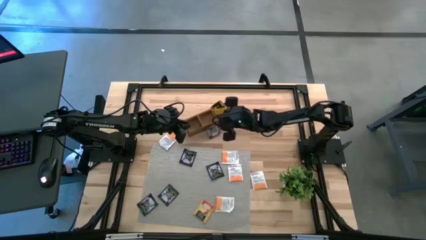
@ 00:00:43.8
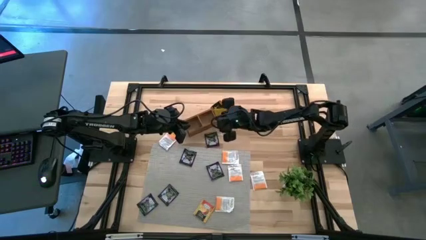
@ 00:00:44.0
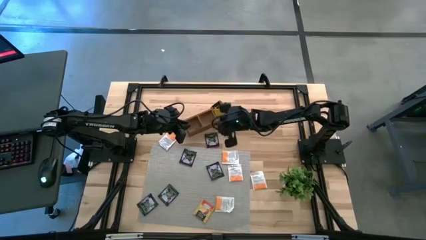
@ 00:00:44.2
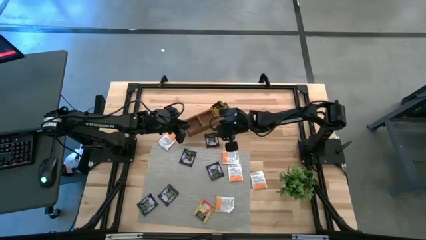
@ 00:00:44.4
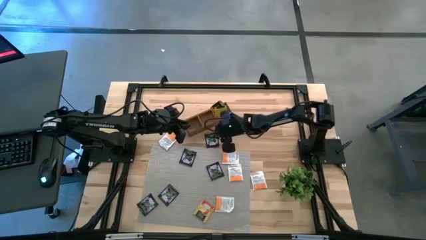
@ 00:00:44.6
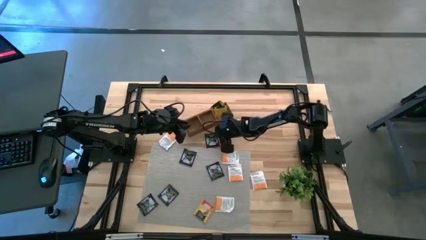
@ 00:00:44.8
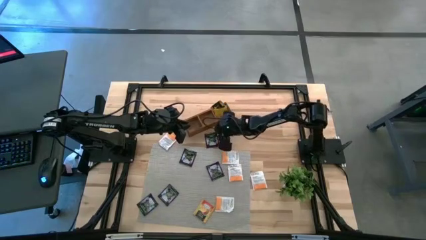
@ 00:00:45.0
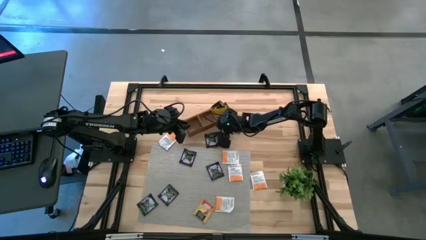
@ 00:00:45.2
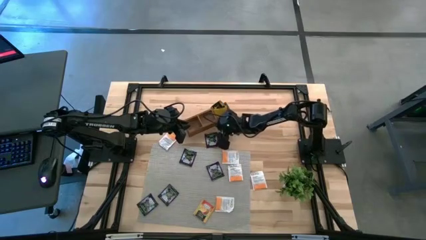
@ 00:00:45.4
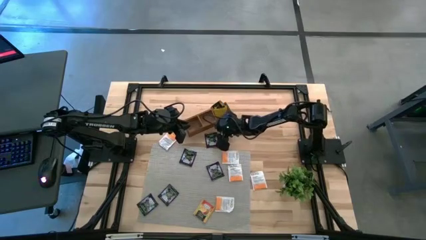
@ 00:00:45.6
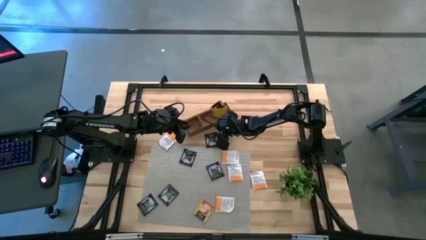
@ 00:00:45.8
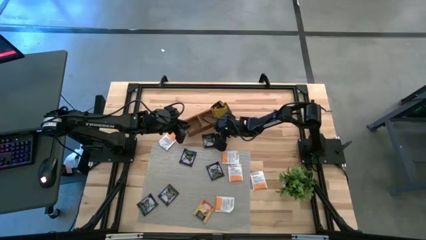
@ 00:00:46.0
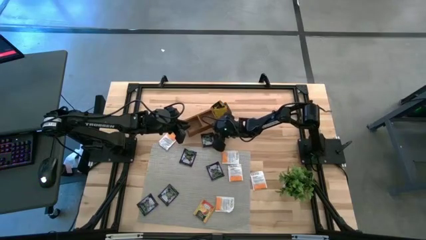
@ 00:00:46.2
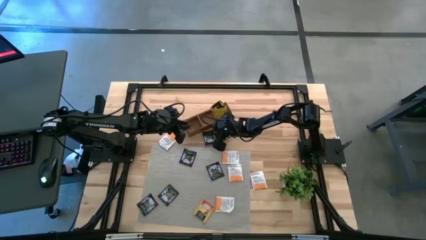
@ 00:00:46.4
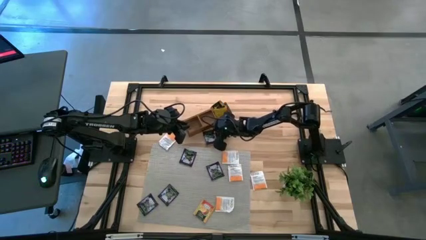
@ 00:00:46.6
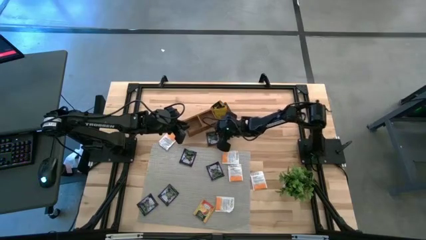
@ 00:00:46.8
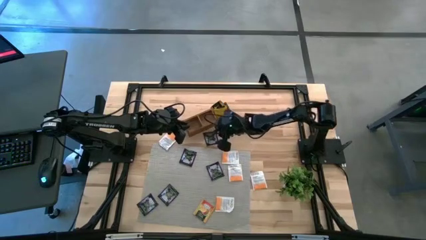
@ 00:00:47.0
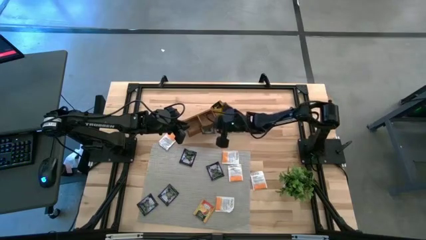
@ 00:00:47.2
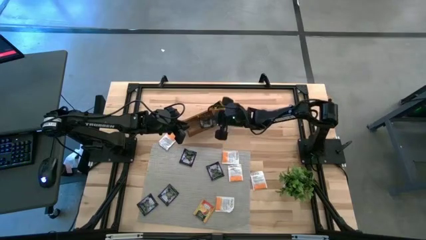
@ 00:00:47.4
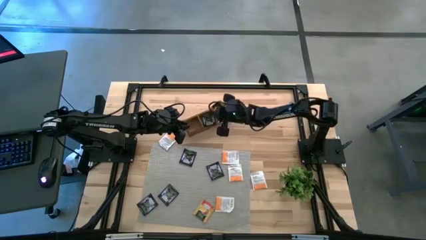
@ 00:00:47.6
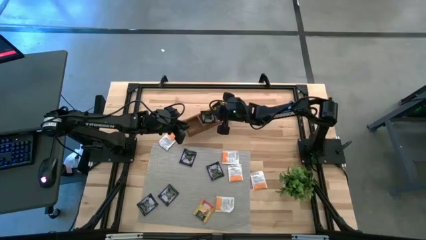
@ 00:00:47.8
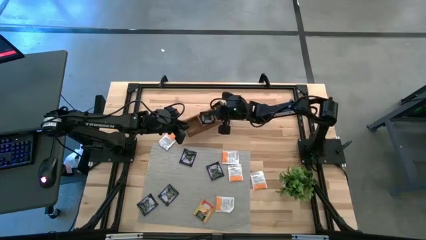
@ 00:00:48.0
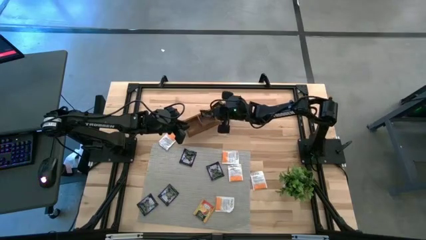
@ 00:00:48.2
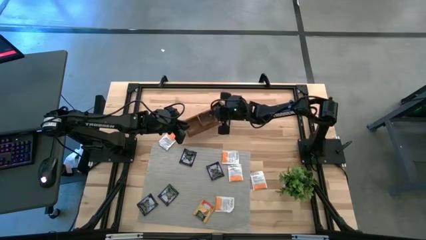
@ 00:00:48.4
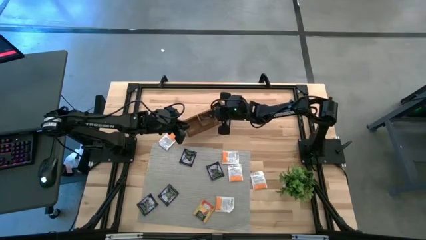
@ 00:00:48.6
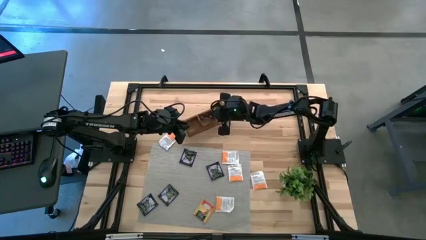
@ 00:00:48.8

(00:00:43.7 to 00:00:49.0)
Task: Pick & Place Tea
Put the violet tea bag into the middle section of the wooden organizer

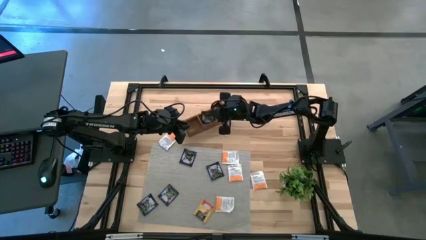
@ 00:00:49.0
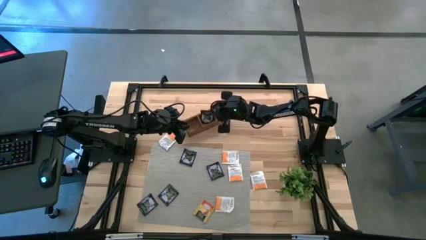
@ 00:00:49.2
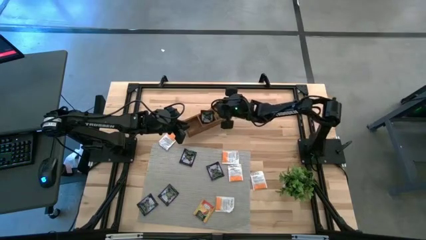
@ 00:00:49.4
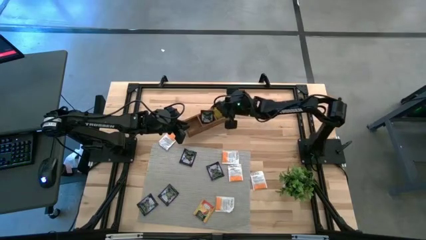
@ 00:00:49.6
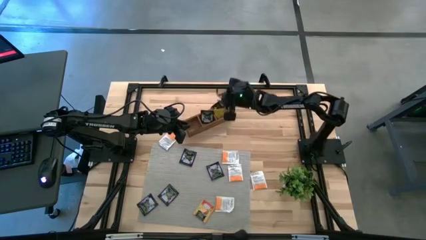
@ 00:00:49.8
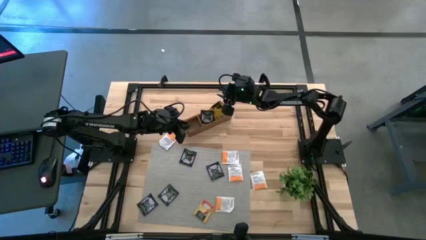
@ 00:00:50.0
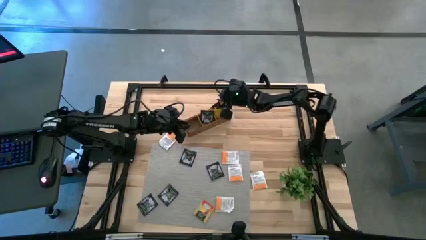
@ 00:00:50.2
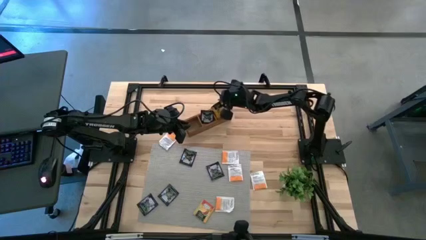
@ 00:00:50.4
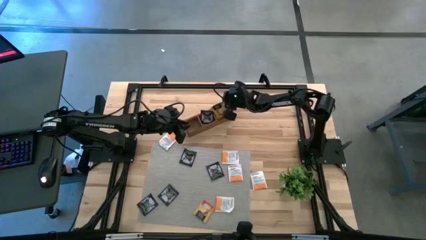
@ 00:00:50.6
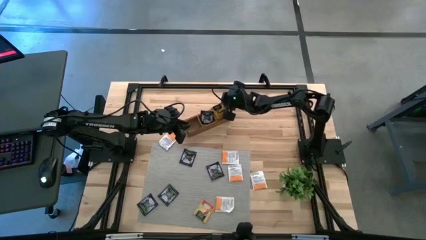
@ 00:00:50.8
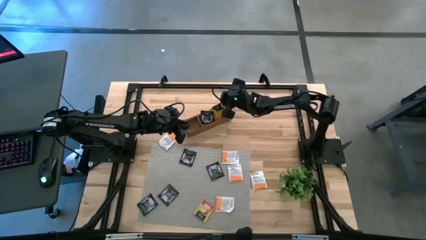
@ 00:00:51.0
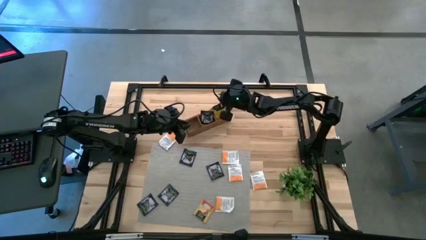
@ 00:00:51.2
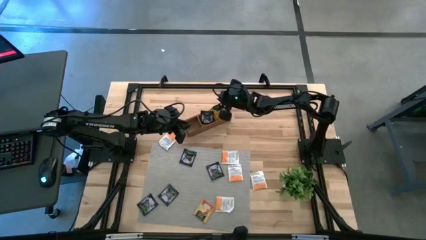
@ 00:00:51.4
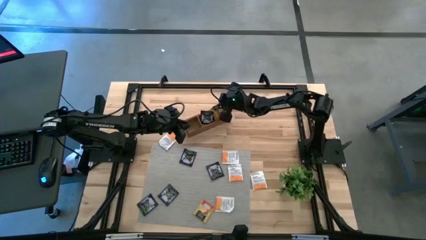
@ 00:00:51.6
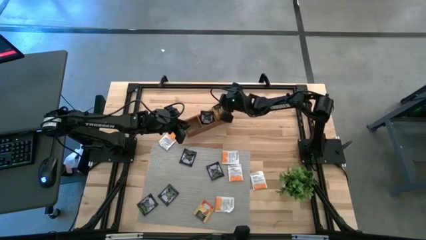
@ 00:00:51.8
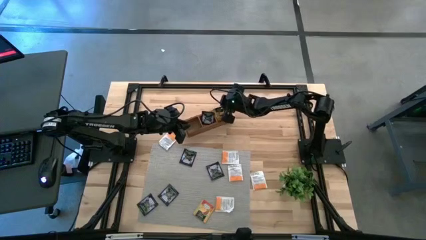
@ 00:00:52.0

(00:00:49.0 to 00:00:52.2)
Adjust the yellow tea bags into the wooden organizer

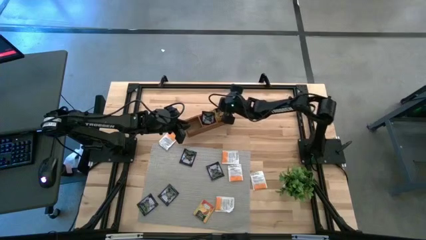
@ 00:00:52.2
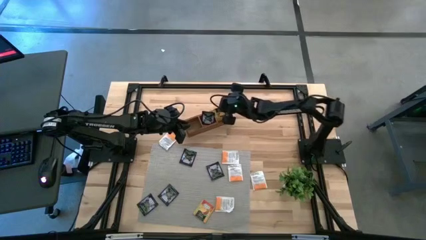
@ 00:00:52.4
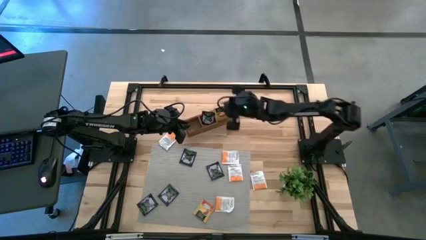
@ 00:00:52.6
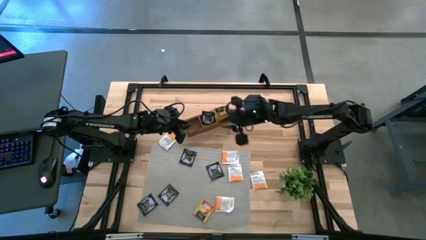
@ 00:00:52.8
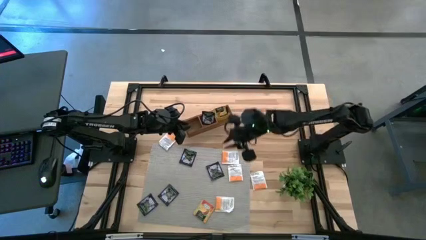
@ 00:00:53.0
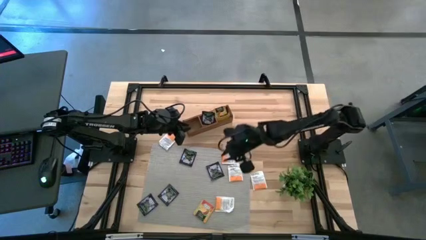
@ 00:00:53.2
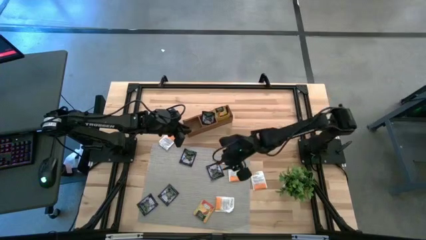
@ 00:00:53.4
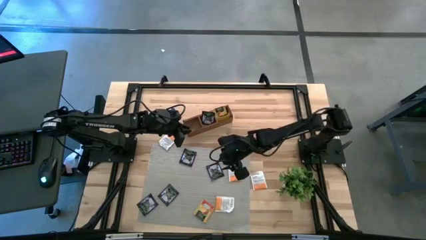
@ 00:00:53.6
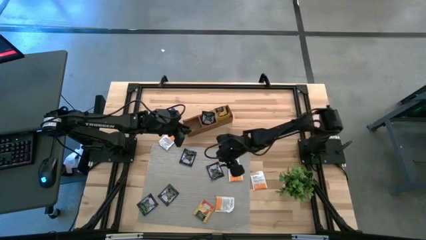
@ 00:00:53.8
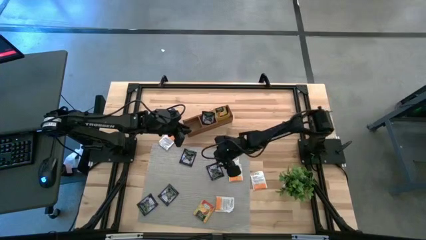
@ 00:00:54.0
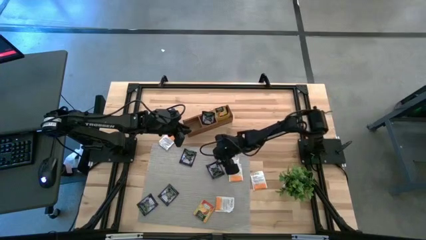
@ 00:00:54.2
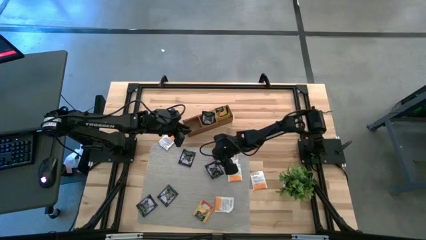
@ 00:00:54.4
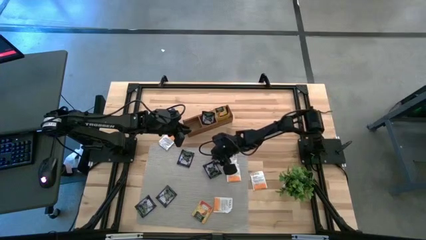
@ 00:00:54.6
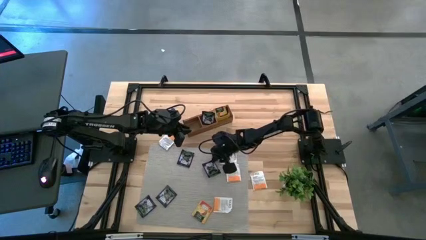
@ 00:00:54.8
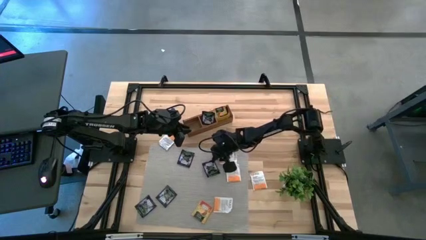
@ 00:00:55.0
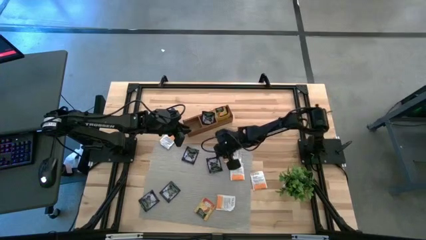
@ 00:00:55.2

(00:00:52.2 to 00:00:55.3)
Put the violet tea bag into the middle section of the wooden organizer

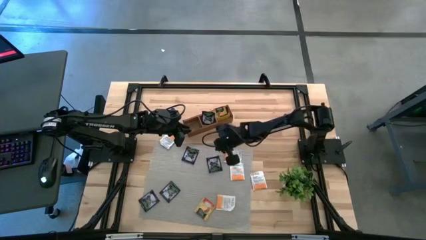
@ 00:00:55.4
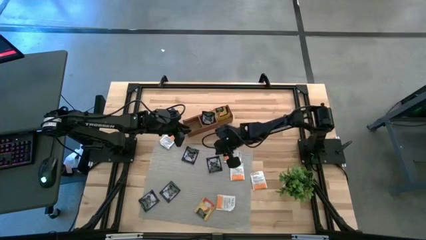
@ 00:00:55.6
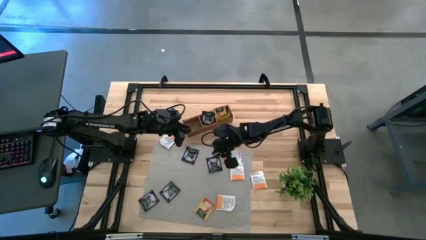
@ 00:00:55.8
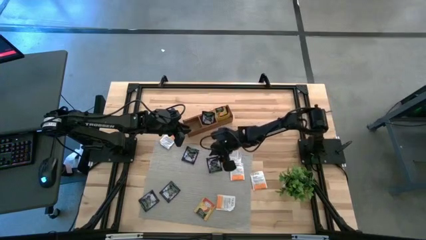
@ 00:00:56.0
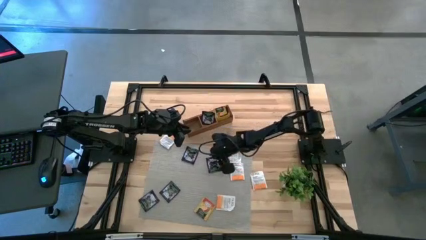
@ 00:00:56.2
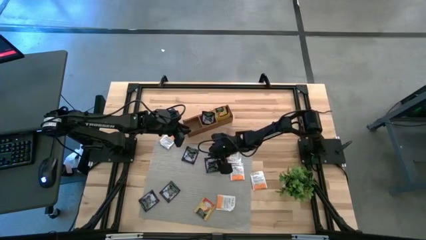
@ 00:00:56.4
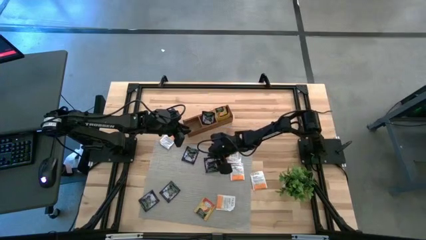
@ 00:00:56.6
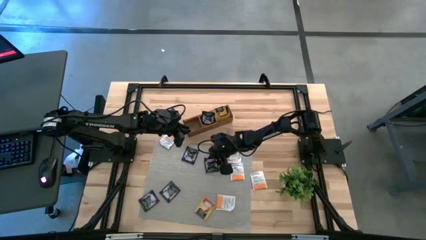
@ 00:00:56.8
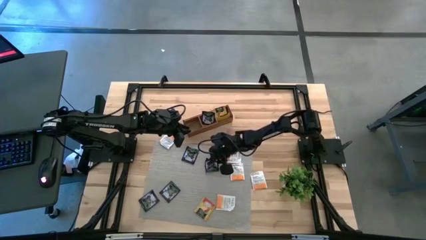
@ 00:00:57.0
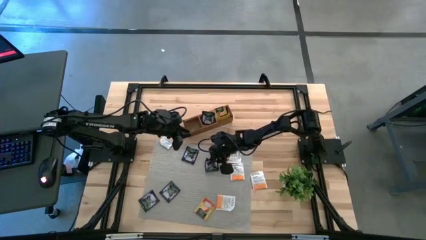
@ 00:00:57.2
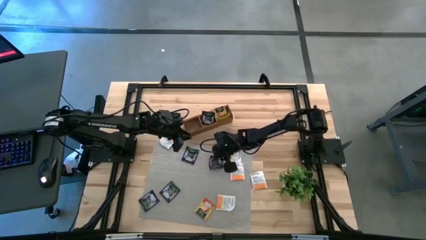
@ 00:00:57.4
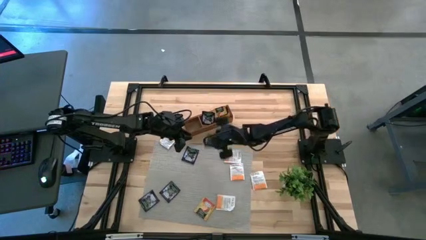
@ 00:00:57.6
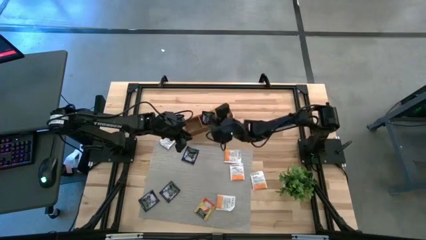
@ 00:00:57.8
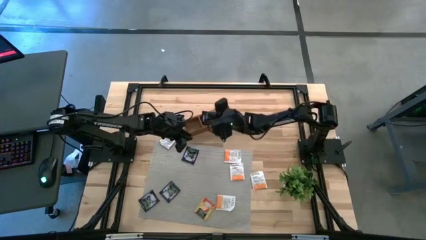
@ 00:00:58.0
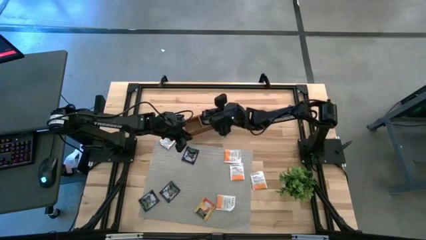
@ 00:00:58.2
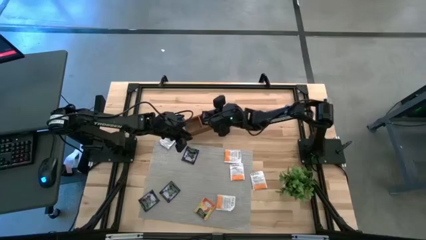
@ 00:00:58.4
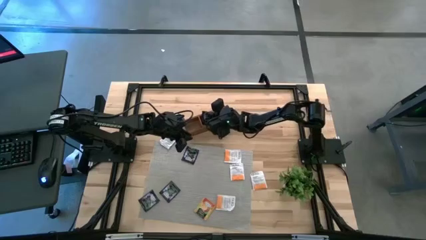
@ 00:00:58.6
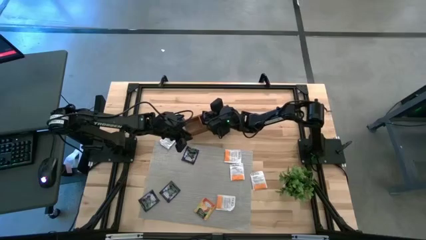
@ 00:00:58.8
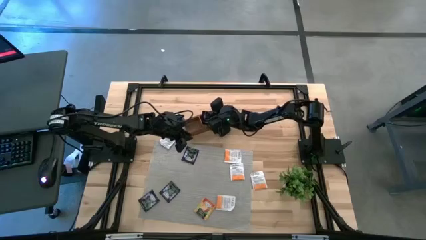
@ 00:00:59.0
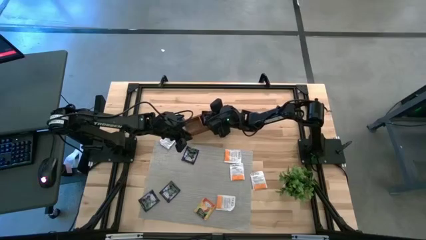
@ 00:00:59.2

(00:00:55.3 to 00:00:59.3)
Put the violet tea bag into the middle section of the wooden organizer
